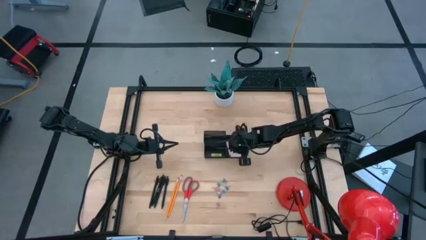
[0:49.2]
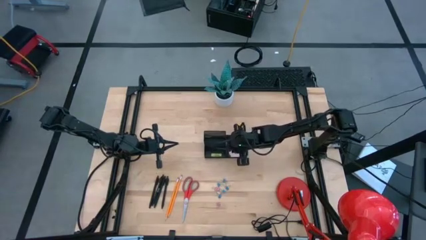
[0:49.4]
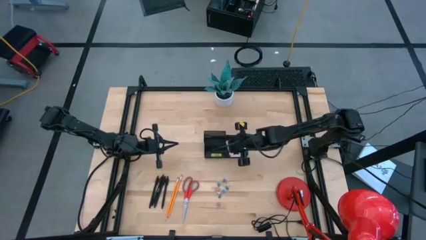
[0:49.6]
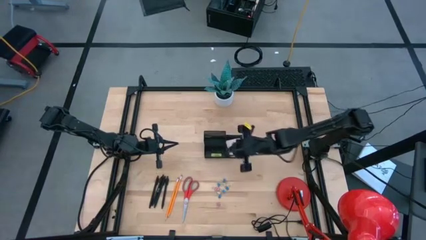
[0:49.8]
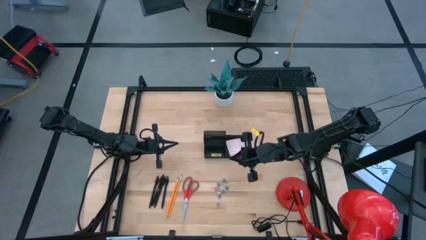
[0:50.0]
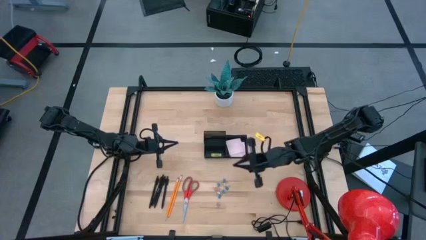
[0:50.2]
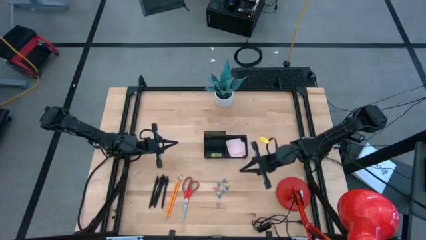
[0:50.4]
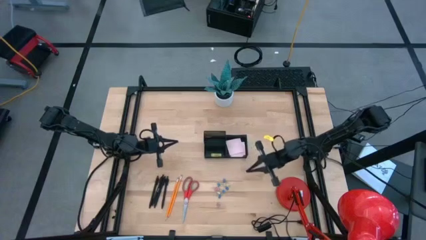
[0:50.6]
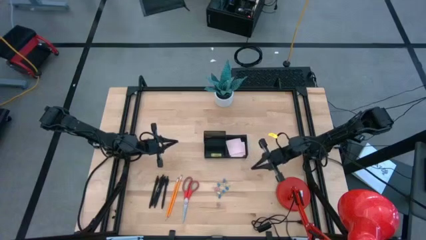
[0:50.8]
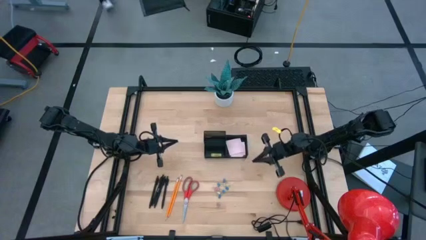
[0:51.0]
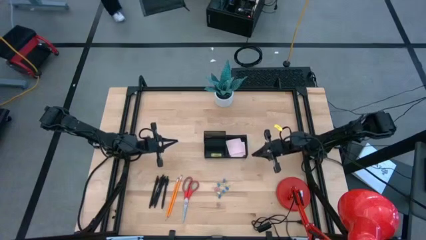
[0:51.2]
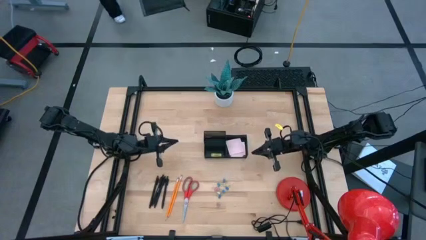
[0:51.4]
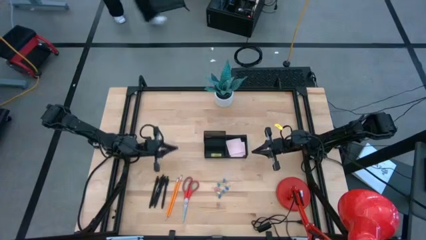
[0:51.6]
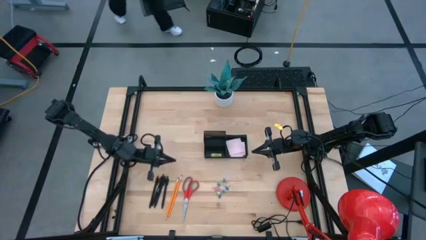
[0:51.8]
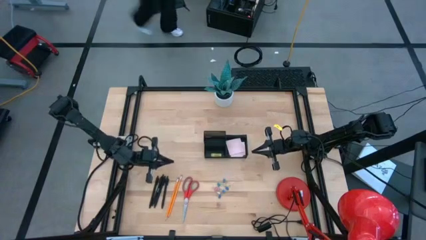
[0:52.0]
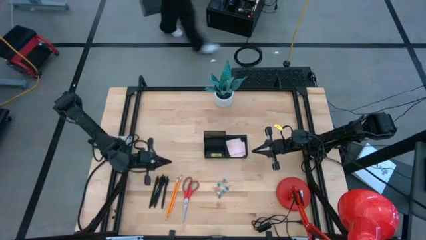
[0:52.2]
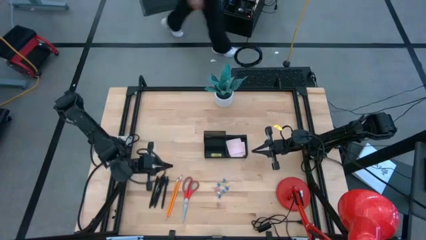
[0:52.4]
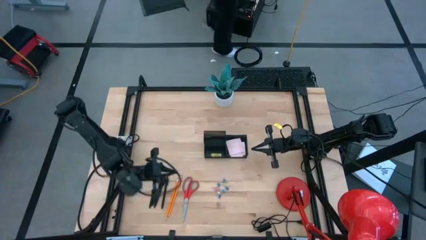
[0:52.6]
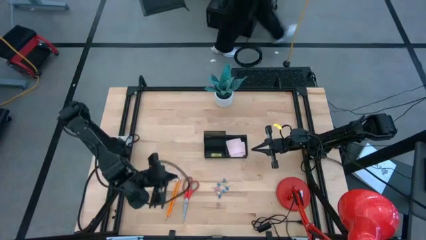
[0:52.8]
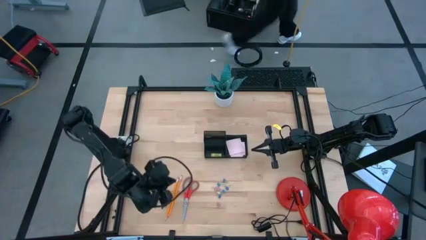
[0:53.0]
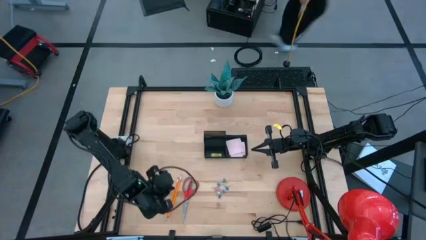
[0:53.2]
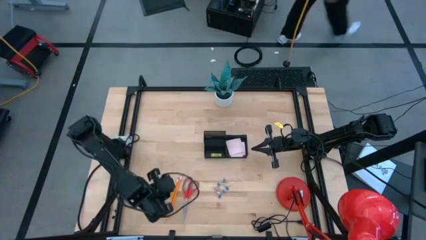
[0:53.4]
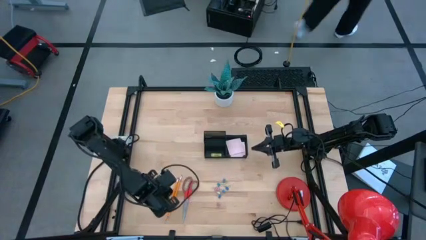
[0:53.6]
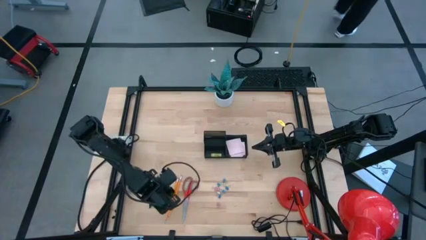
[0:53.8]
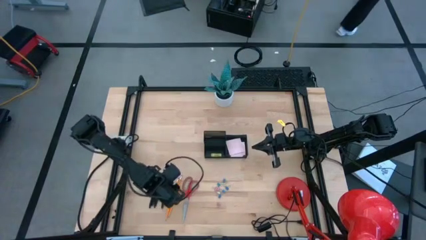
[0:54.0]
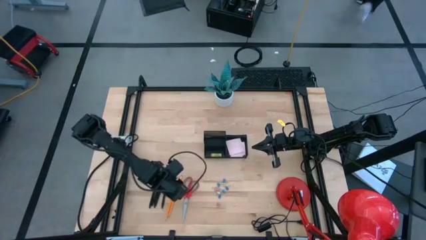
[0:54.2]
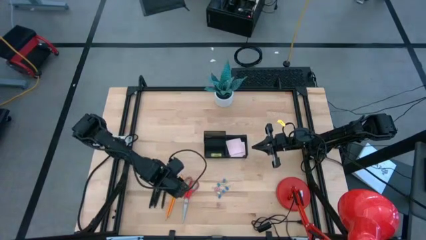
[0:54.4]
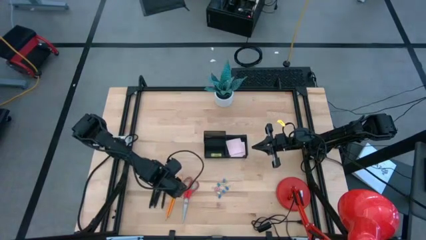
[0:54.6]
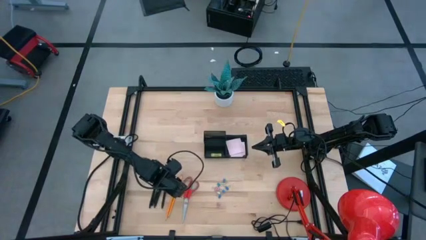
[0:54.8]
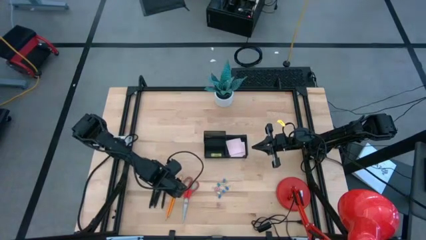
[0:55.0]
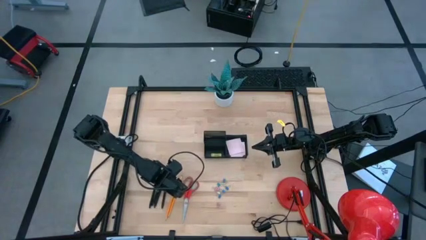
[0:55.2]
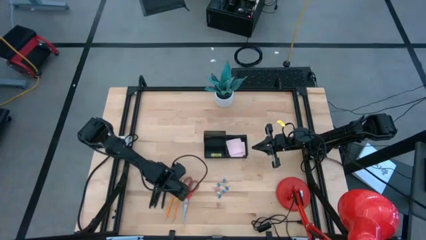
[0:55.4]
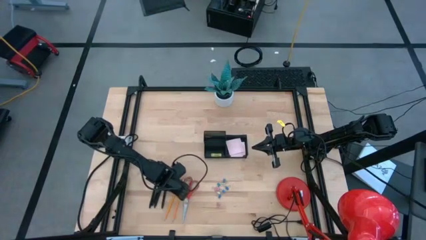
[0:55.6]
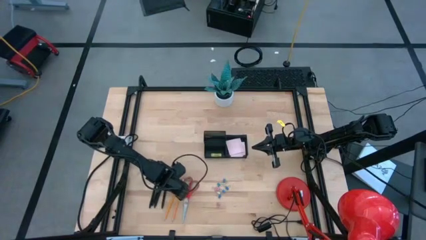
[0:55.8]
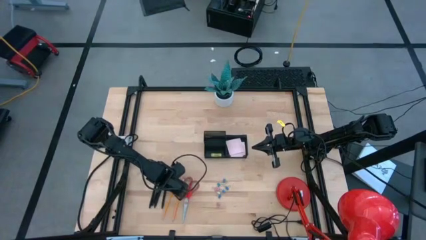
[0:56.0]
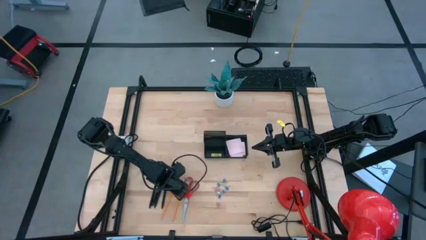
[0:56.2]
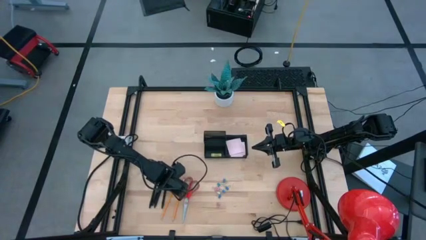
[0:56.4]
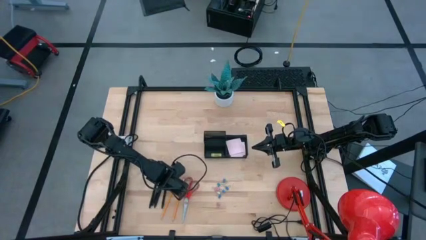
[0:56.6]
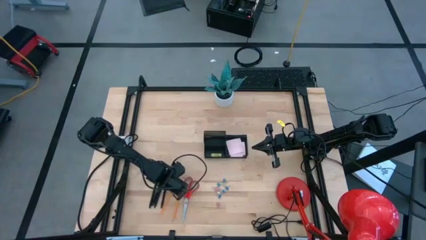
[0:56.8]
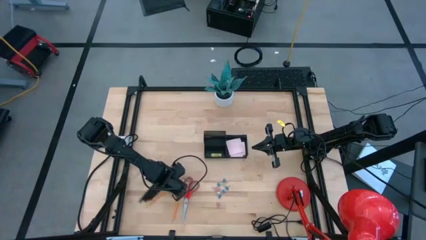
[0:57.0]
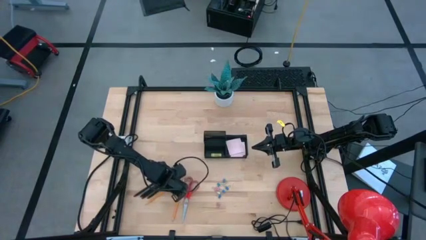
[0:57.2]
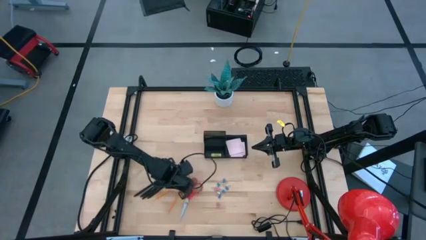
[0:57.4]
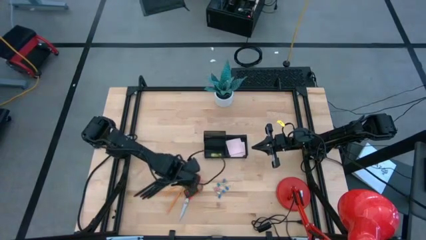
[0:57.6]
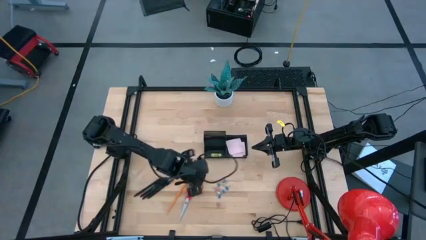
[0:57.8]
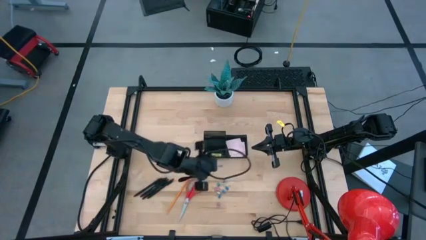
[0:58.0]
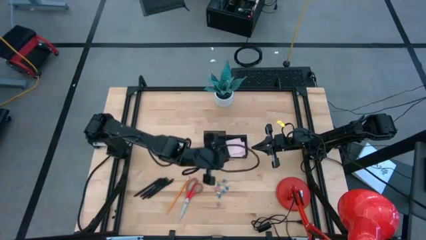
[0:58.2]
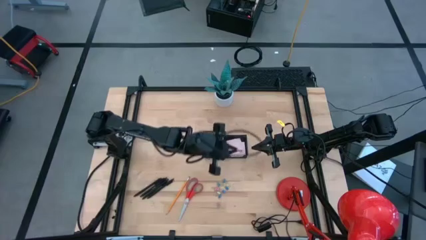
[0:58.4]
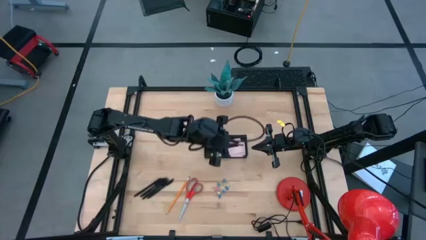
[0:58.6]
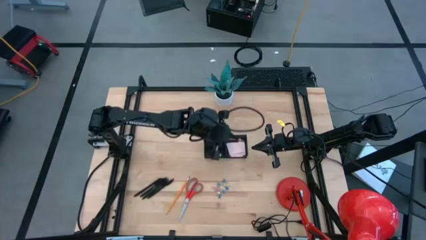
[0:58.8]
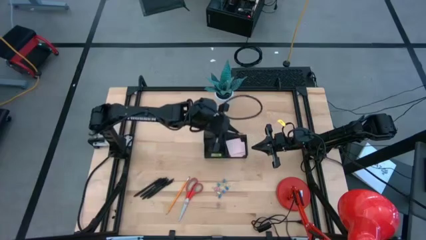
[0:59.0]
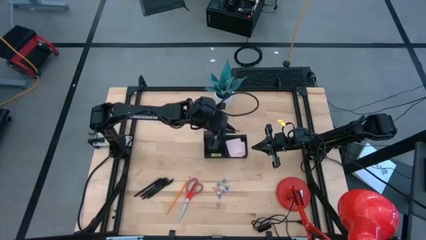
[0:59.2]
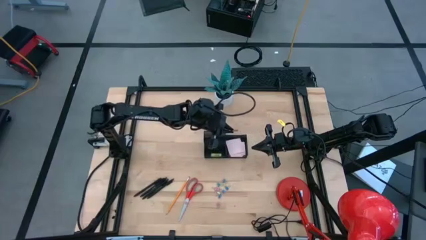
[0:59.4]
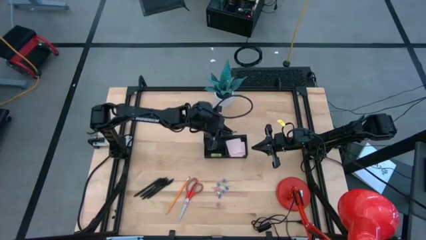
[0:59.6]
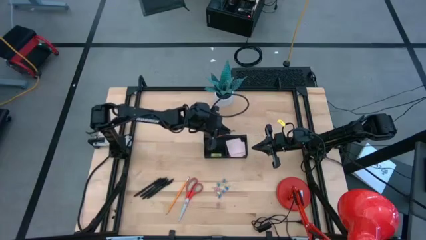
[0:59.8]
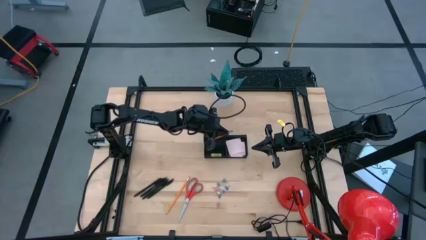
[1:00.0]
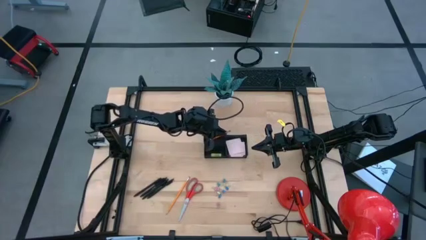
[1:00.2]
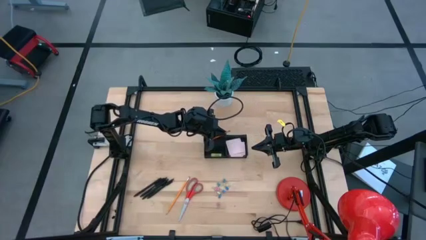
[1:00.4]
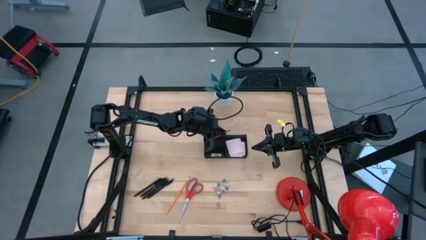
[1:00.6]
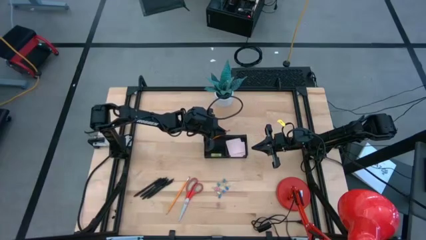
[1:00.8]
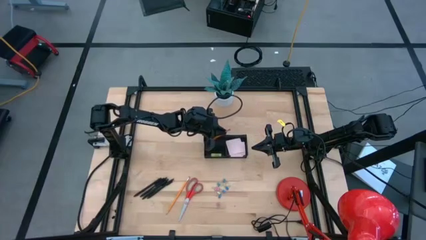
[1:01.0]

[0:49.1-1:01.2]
Task: Pick and place office supplies into organizer
Put the yellow pencil into the desk organizer

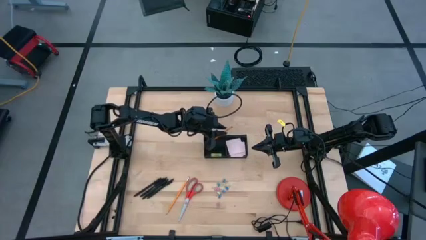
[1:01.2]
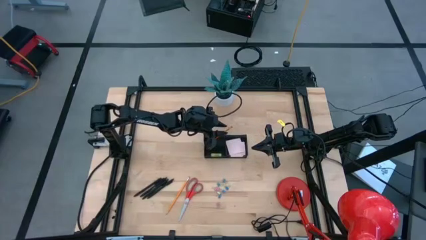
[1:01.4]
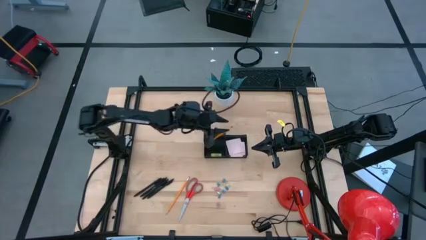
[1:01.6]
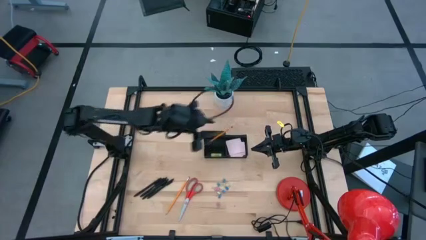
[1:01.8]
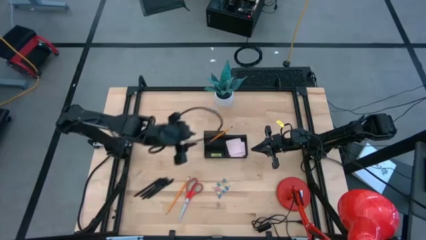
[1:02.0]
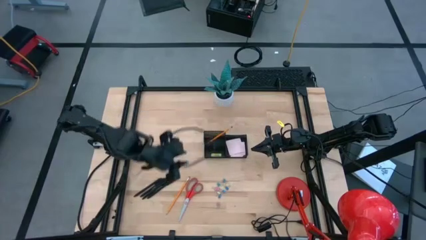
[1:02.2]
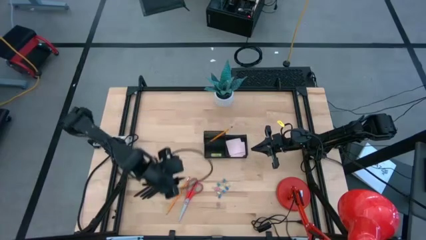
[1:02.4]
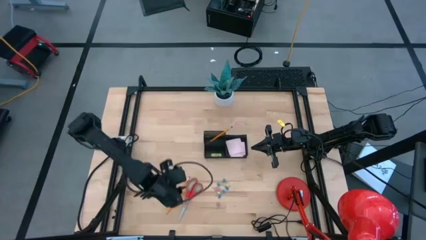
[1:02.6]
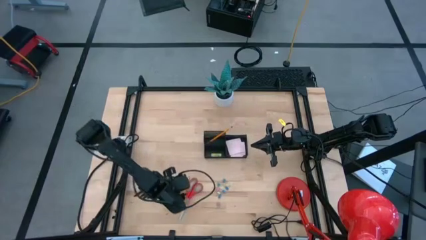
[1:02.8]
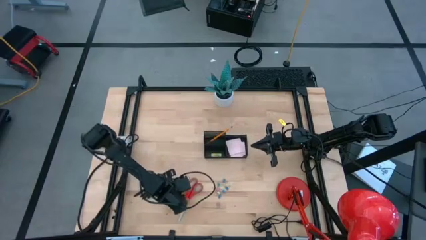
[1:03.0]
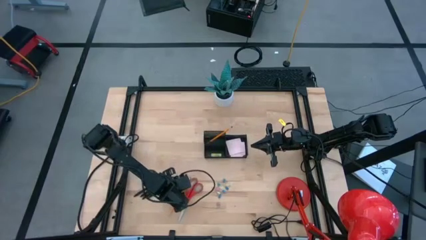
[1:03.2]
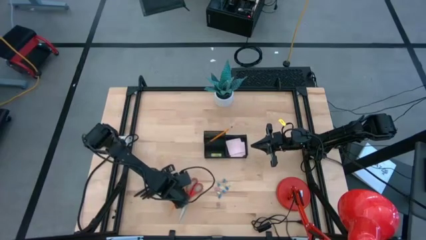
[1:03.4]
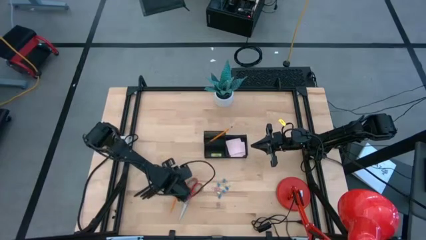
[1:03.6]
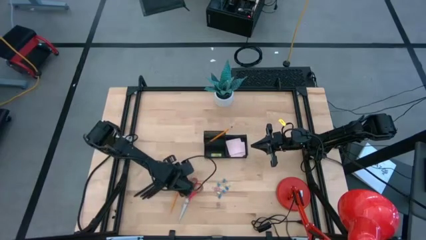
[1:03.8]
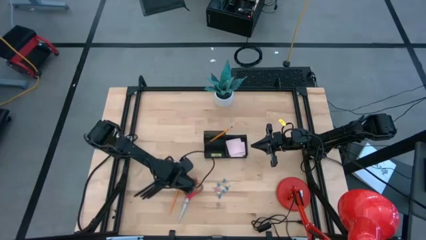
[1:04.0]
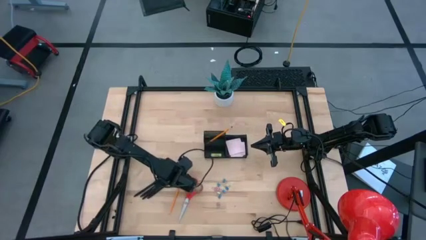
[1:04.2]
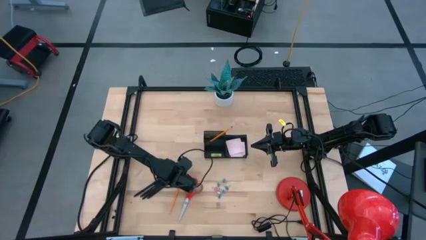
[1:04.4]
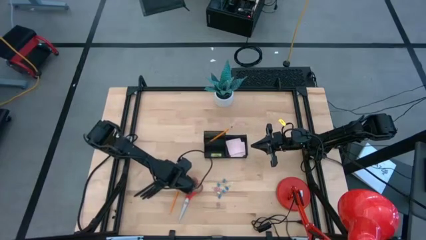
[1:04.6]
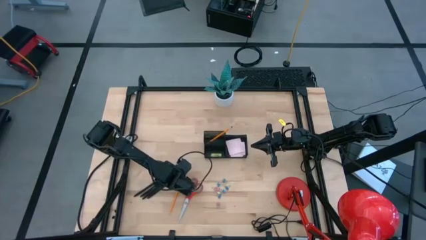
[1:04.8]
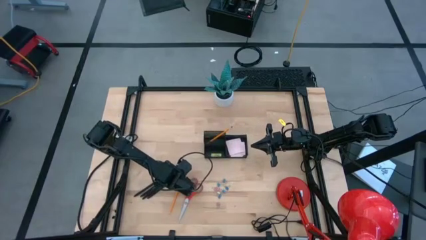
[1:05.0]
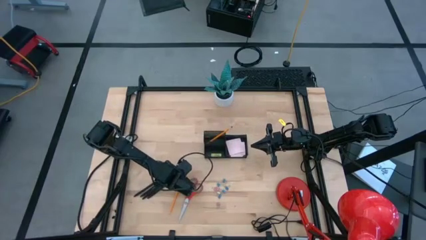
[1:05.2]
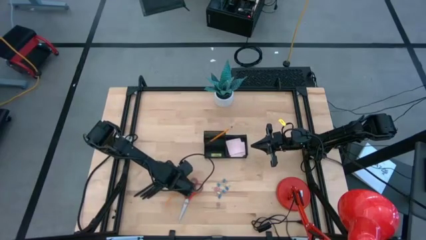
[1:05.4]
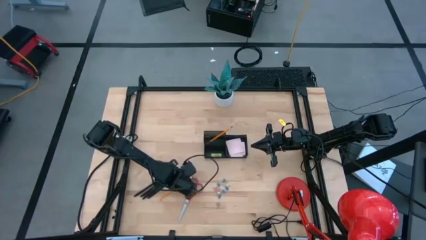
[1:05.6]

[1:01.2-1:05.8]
Put the yellow pencil into the desk organizer

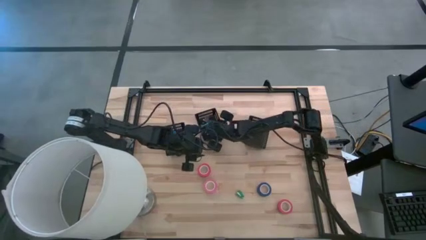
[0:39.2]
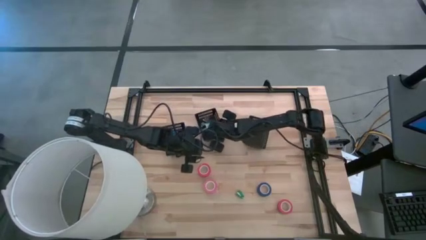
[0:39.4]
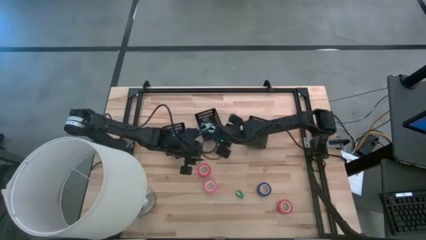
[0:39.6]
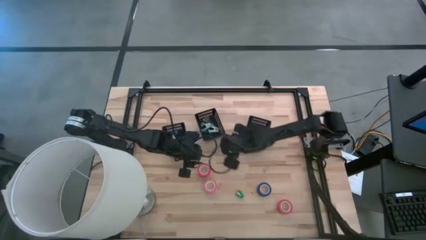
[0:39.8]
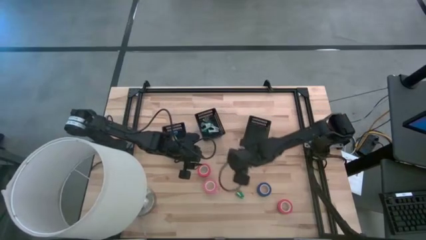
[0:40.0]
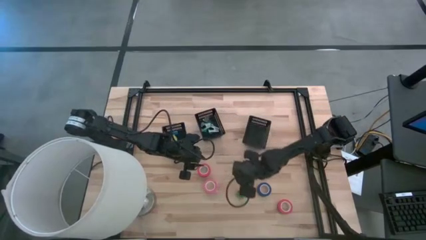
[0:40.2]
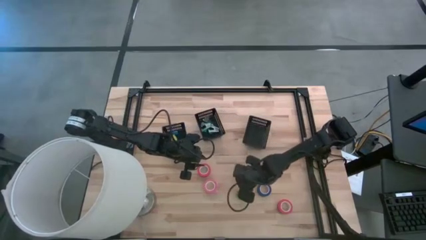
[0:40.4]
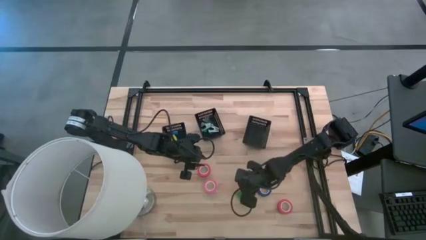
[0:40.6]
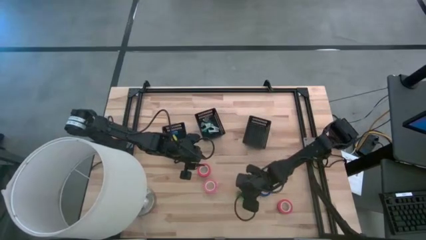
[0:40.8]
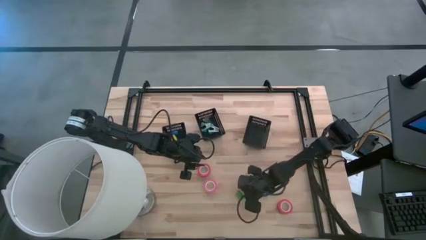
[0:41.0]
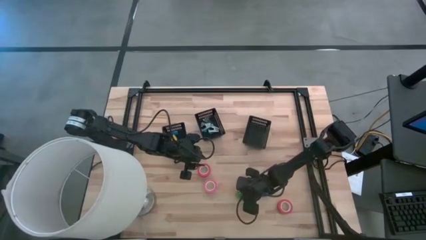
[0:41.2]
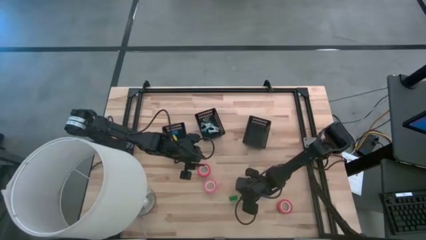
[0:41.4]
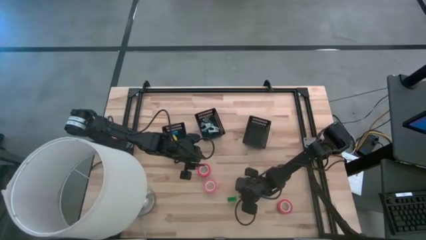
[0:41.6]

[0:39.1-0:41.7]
Task: Pick and place Stapler, Stapler remover, tape
Put the green stapler into the left black bin
